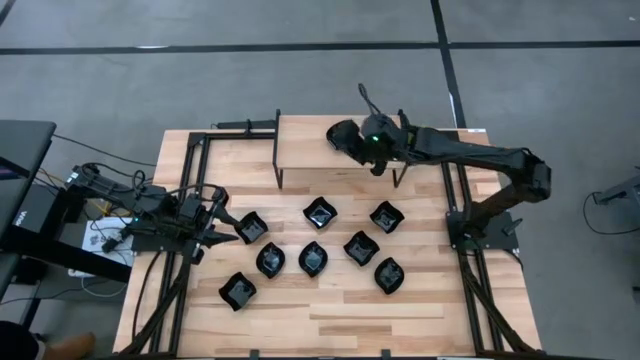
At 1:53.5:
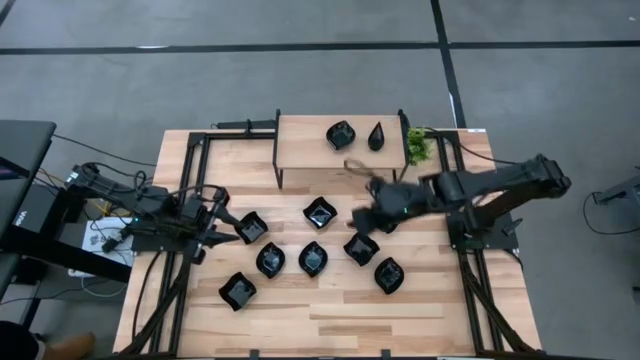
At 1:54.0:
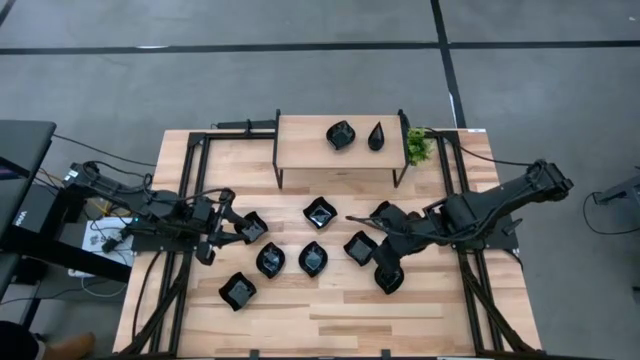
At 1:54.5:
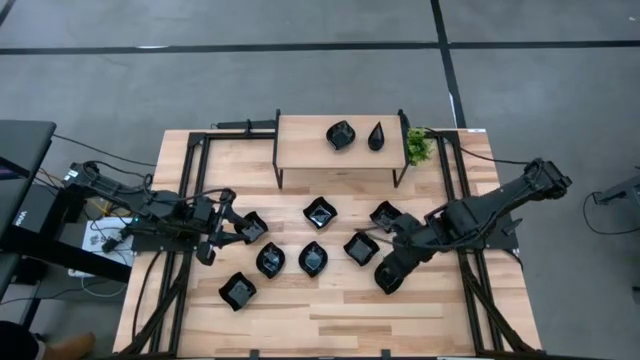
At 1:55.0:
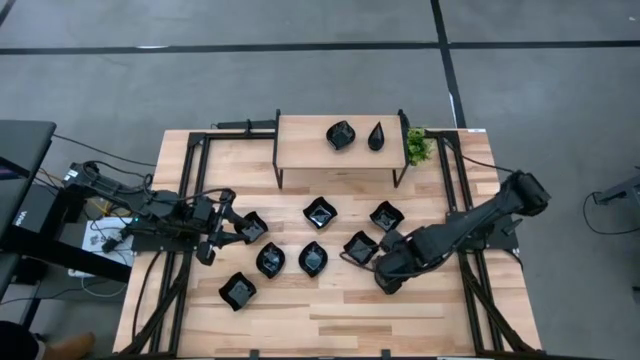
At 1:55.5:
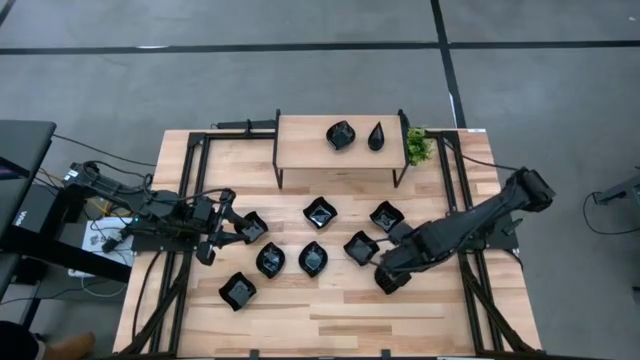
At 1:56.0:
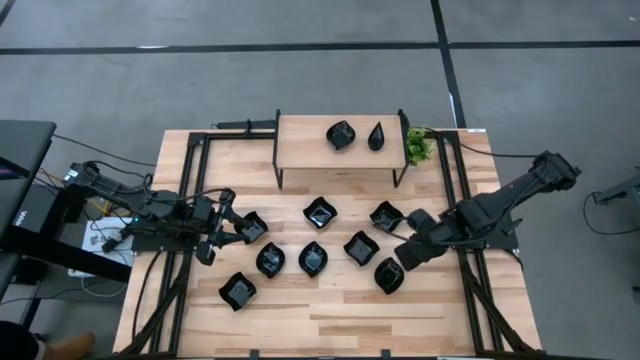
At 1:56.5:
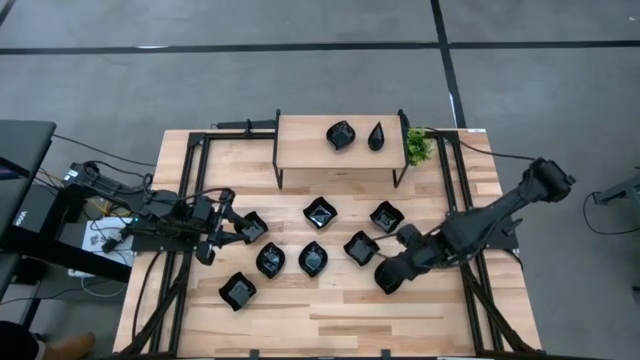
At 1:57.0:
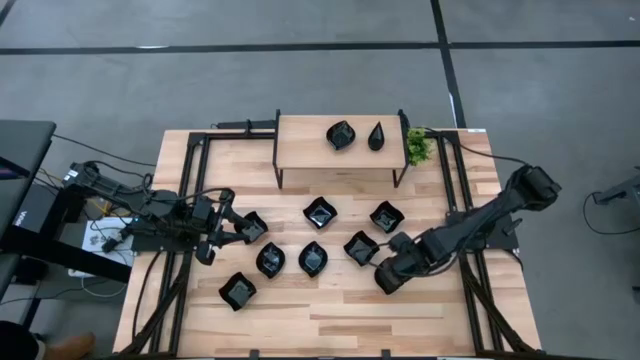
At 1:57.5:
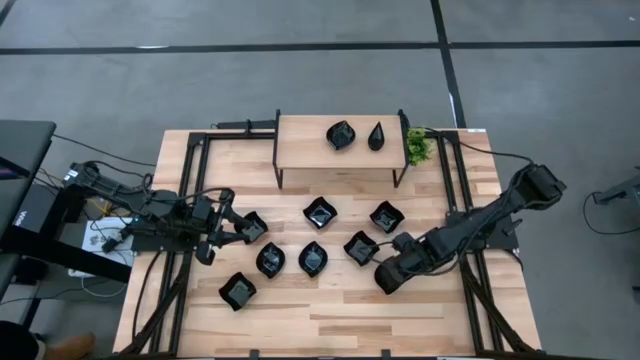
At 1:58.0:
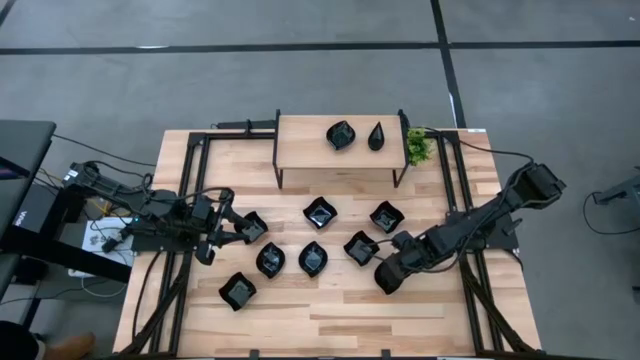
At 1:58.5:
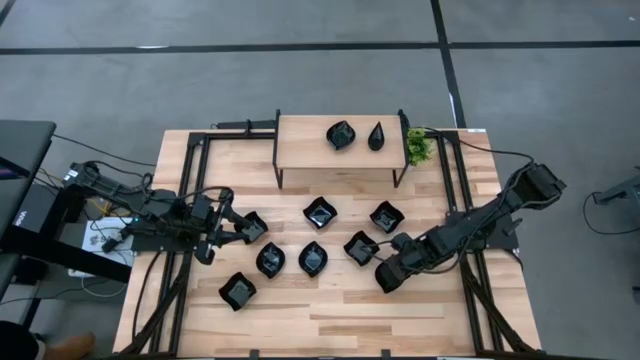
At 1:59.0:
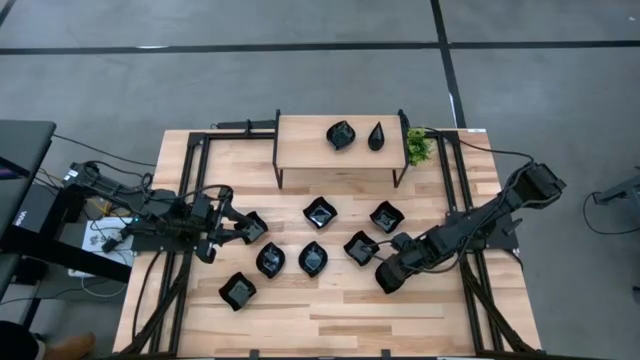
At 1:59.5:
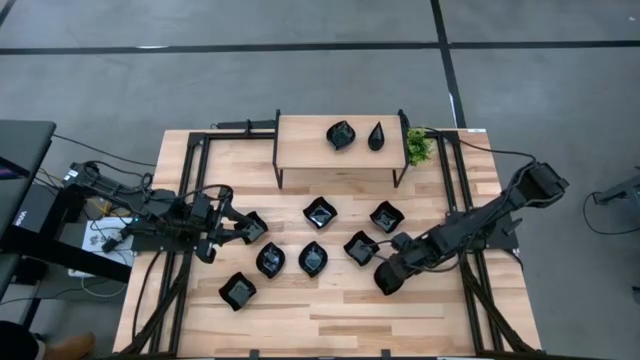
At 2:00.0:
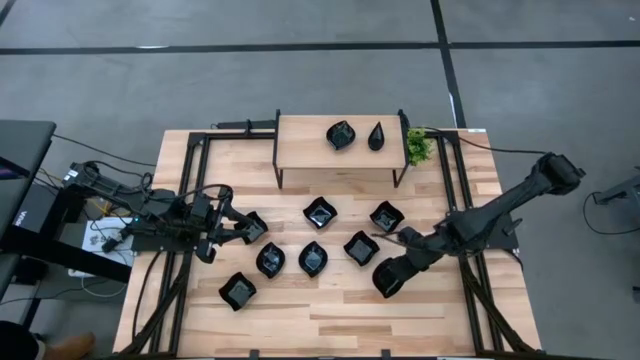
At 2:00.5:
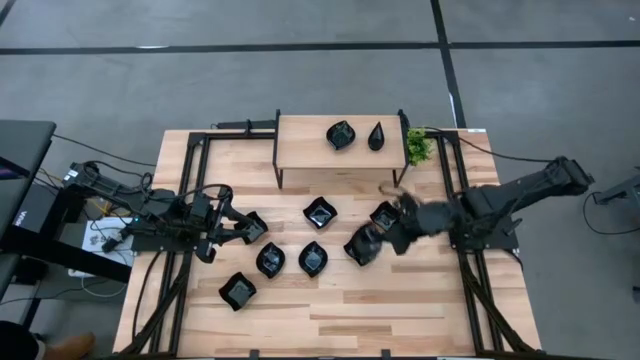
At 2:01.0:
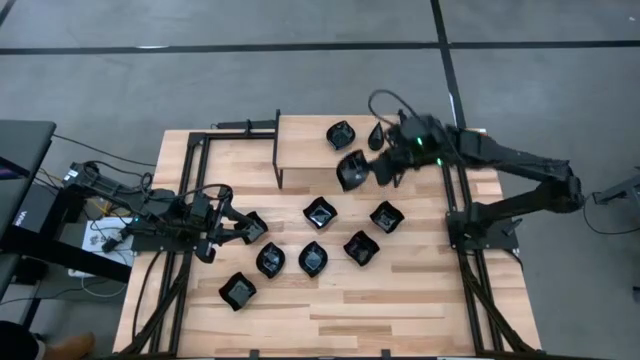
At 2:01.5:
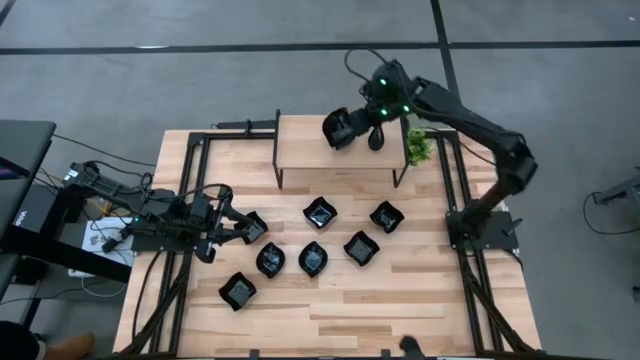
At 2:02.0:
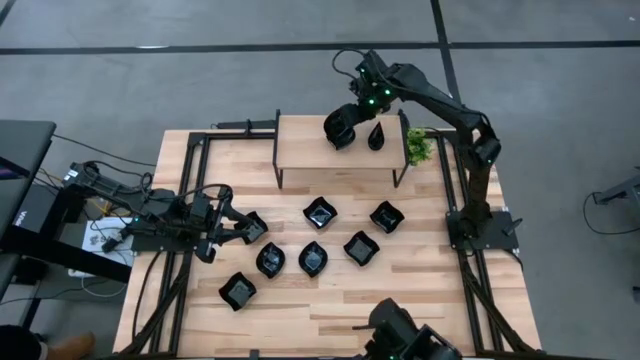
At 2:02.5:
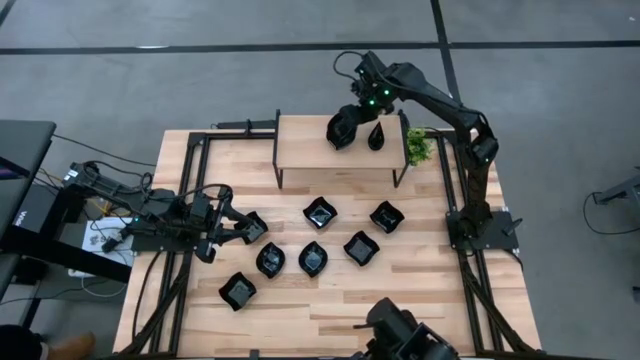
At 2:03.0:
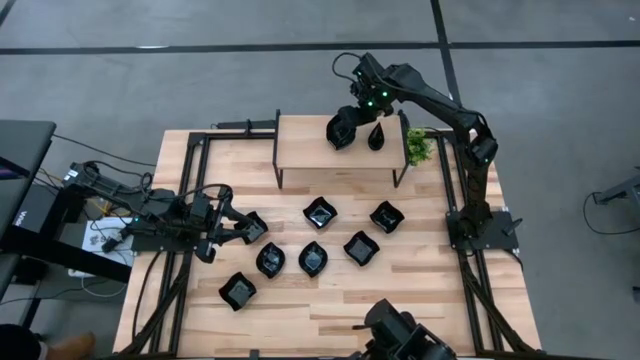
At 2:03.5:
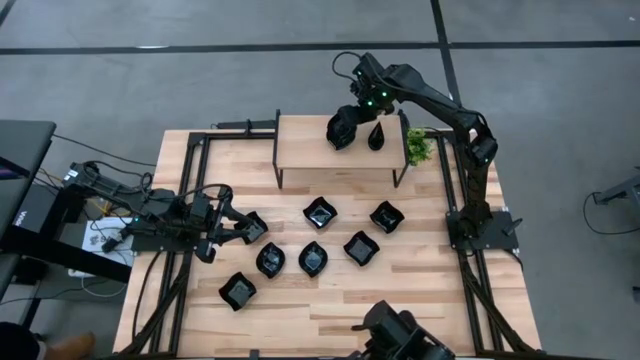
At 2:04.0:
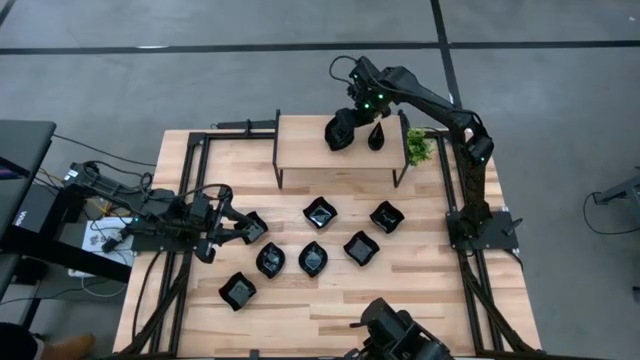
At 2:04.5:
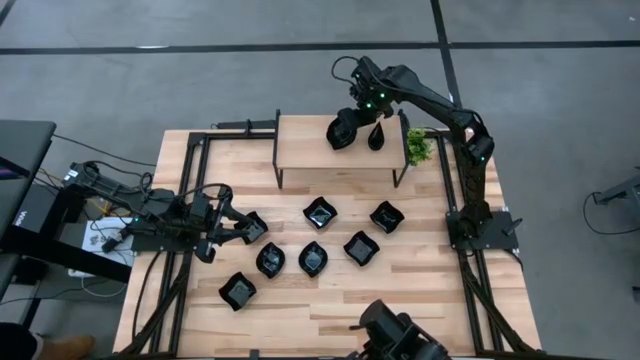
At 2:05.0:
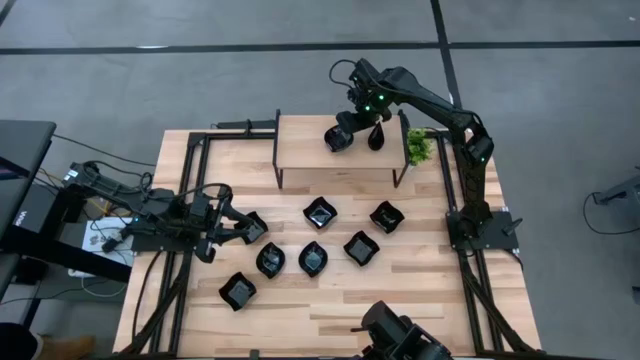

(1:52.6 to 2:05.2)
Task: Pick & Place Mini shaped plates
Stack the leaf-shaped plate on top of the other leaf-shaped plates on the shelf

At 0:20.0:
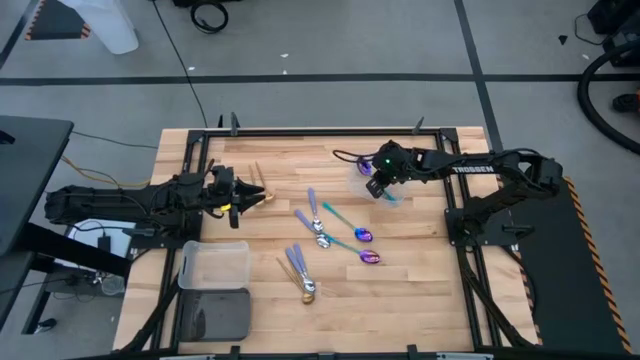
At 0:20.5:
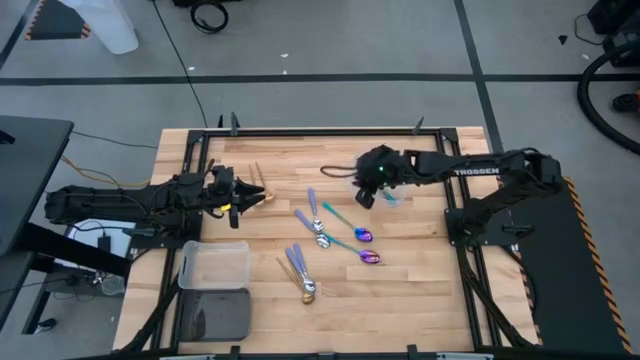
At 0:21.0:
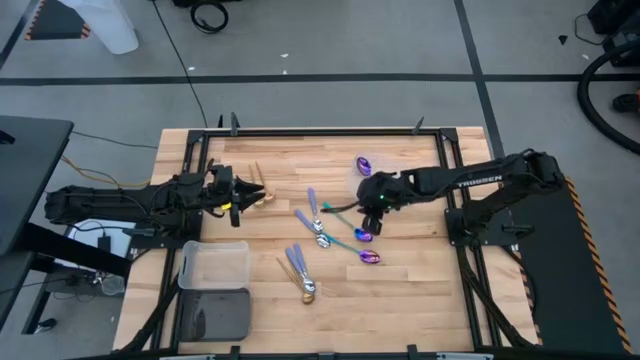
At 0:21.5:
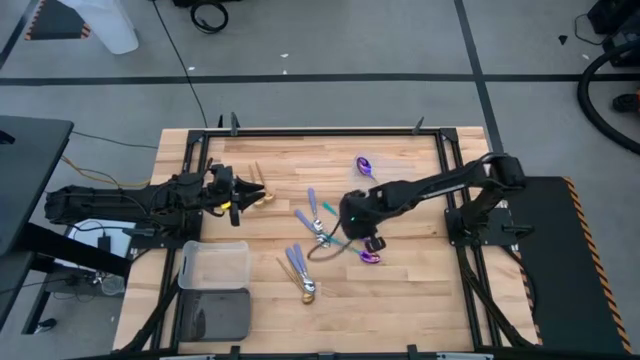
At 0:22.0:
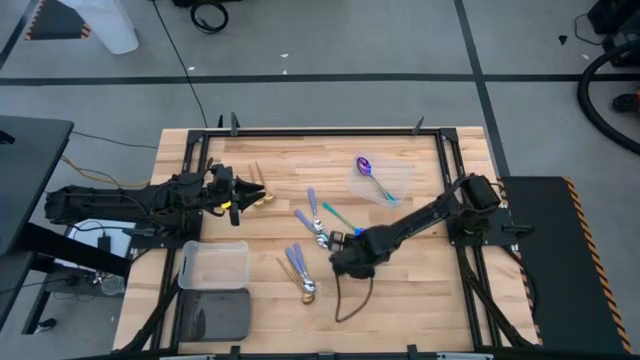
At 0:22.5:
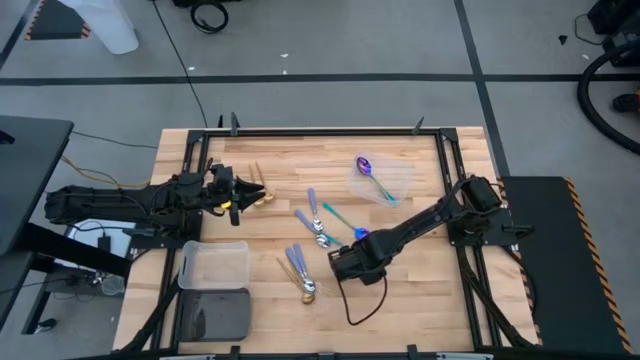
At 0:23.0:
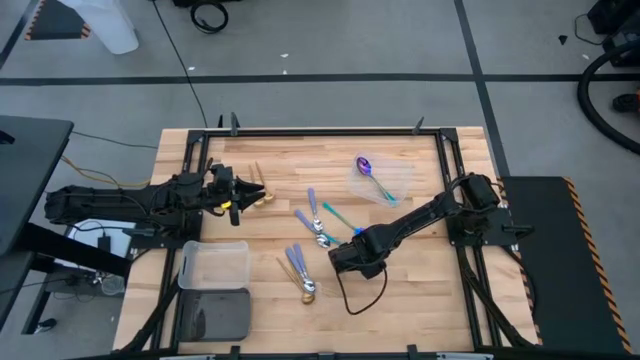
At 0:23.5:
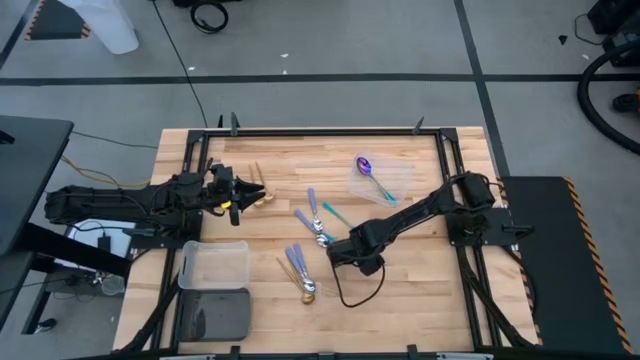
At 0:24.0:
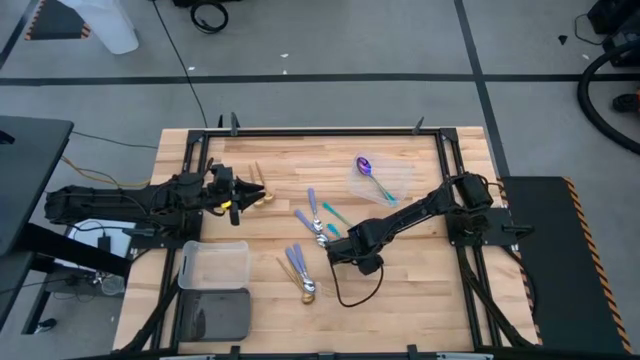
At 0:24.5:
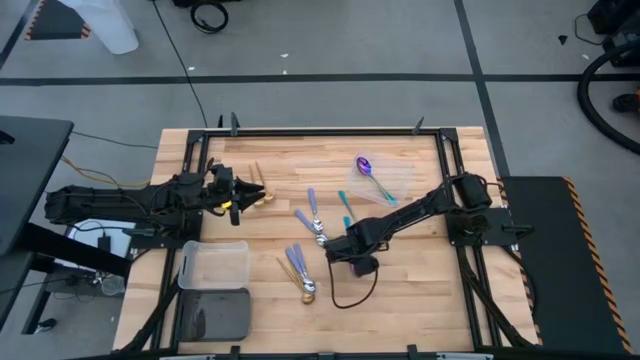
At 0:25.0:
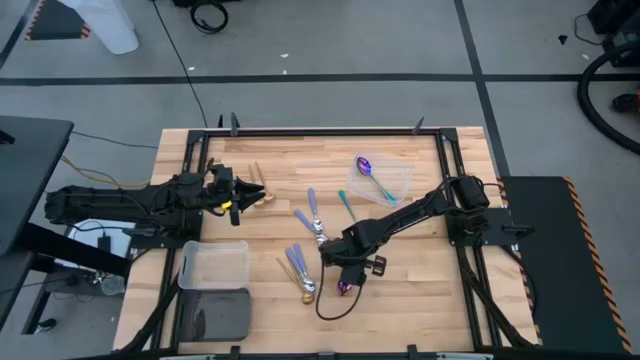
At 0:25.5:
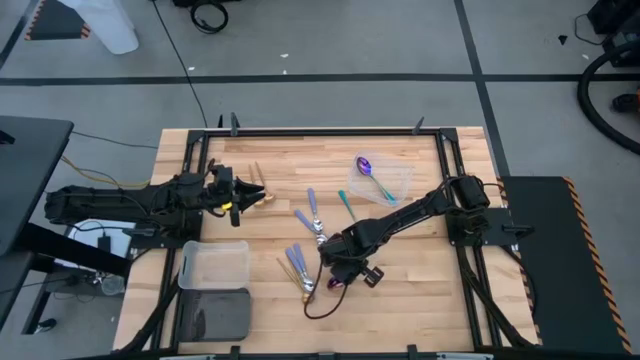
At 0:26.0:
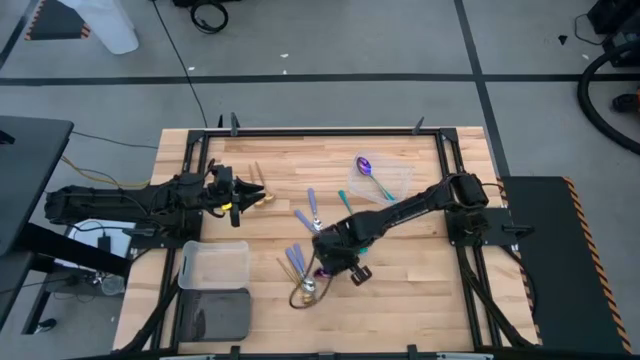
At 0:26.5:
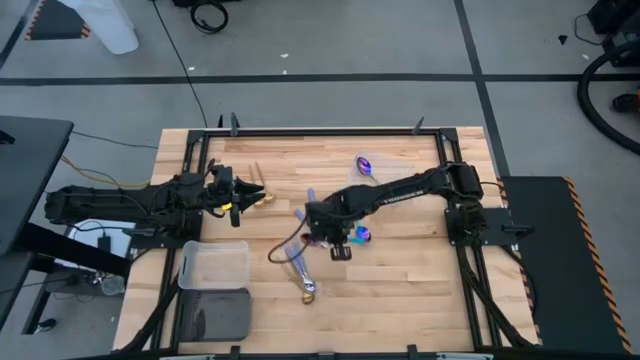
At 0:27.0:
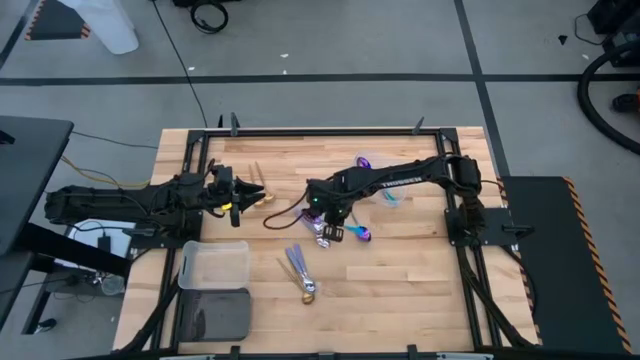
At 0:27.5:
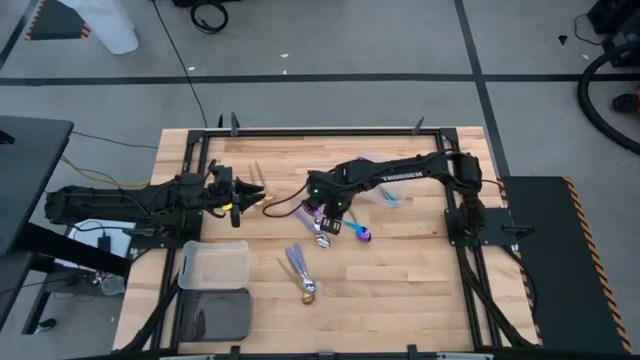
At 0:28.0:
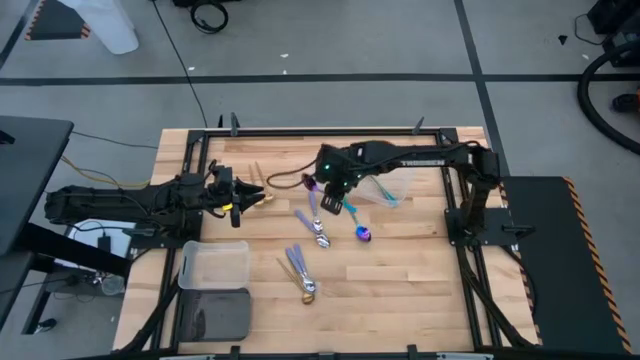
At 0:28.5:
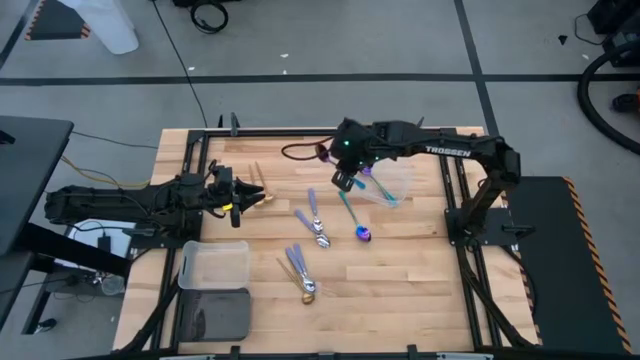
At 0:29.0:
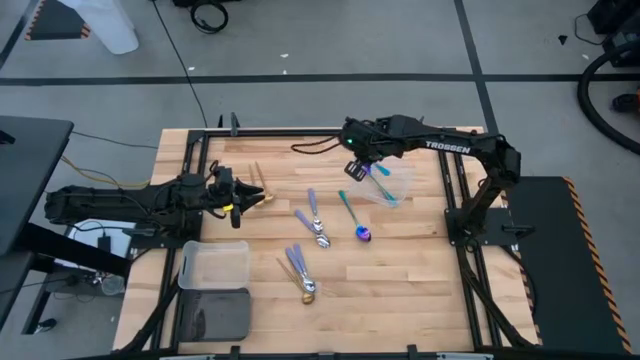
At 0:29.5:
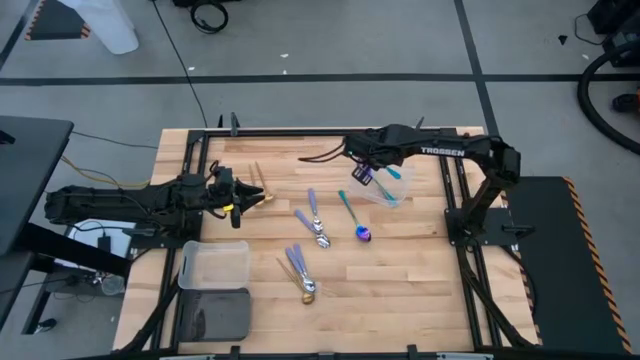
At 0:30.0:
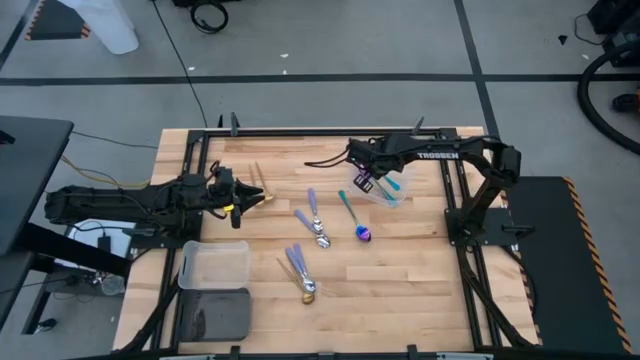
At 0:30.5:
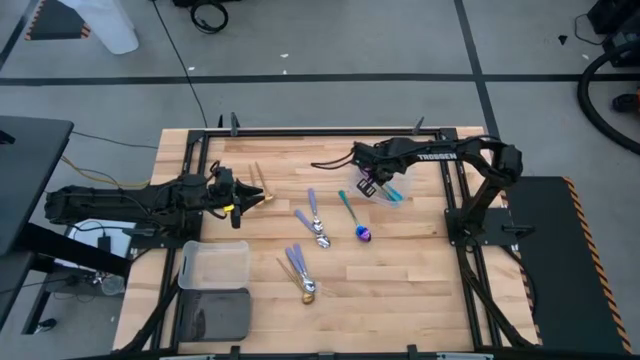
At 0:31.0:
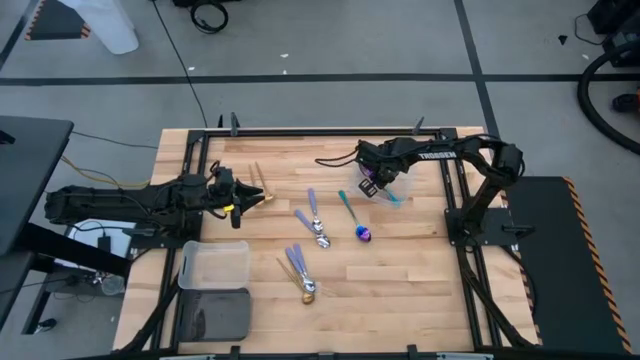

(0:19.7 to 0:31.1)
Task: Sort silverware by color (type)
Put the blue spoon into the top transparent bin
